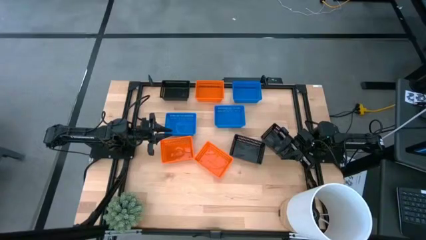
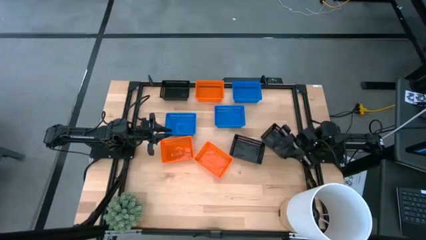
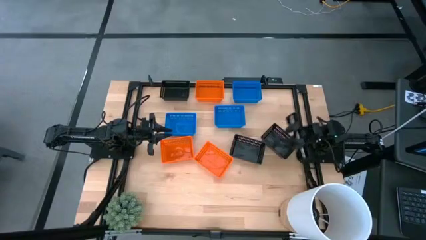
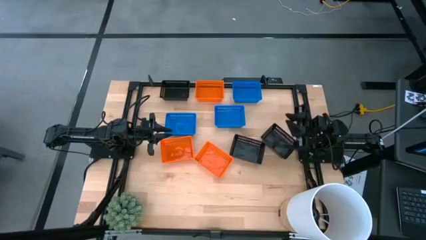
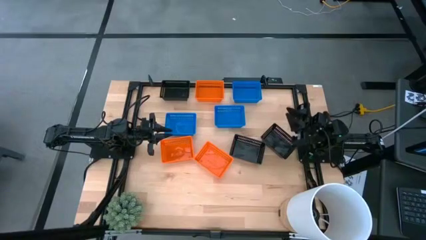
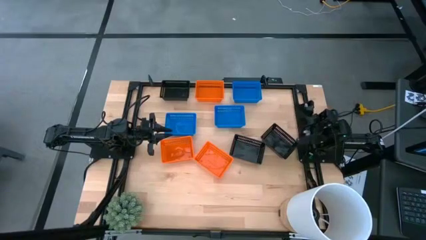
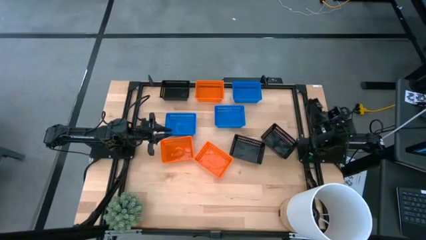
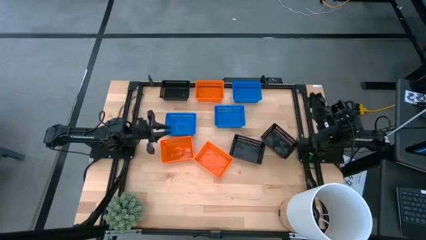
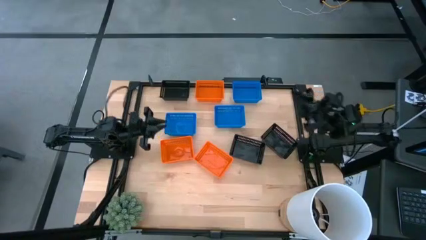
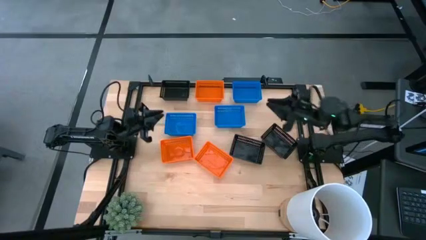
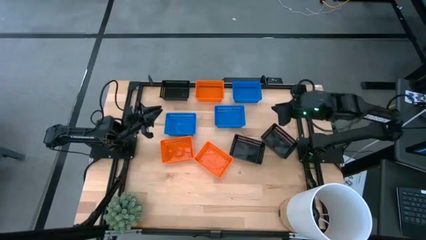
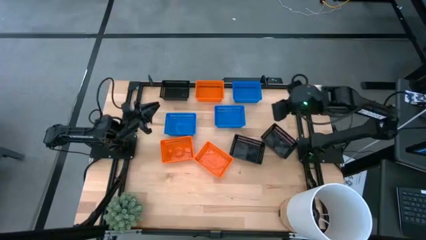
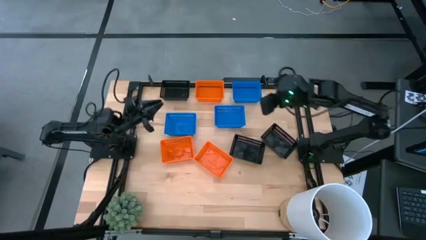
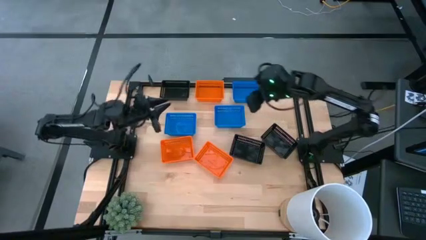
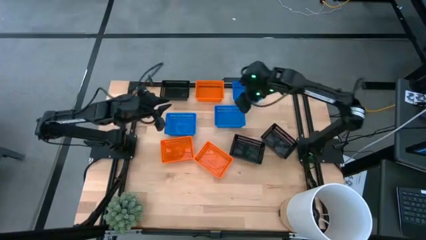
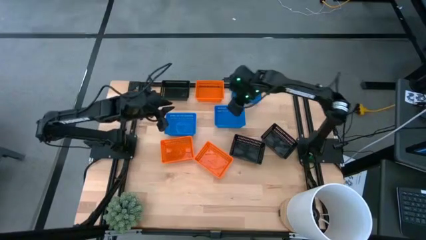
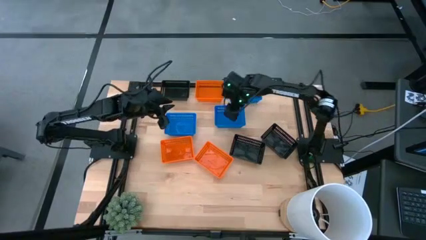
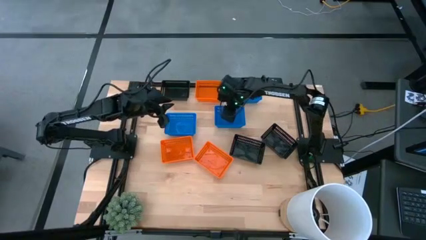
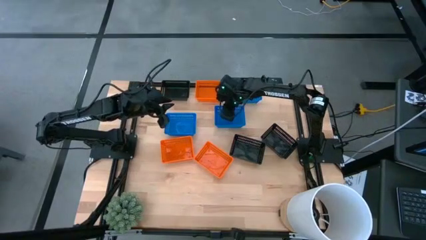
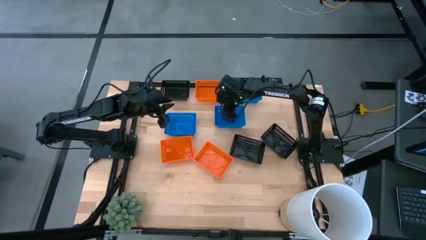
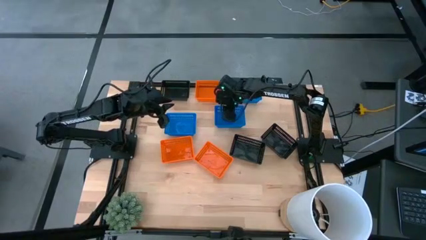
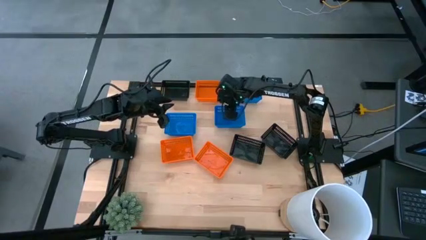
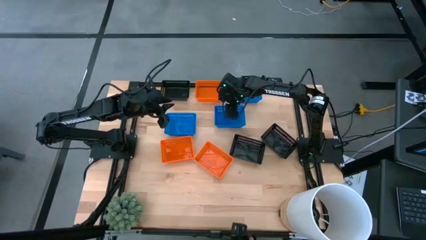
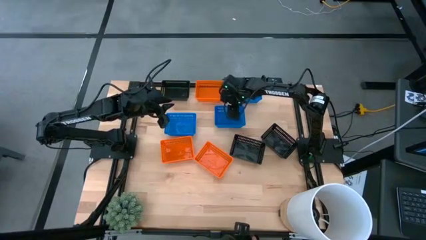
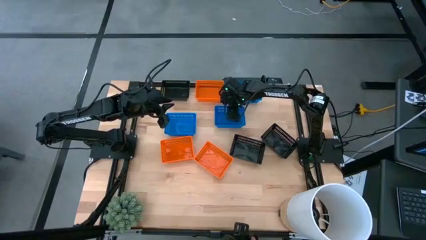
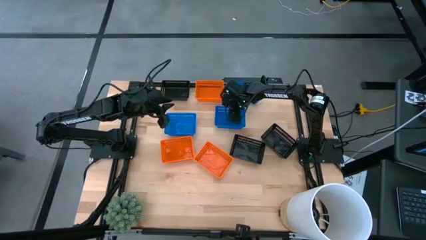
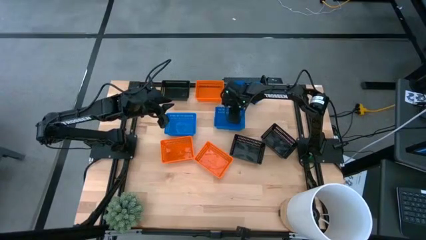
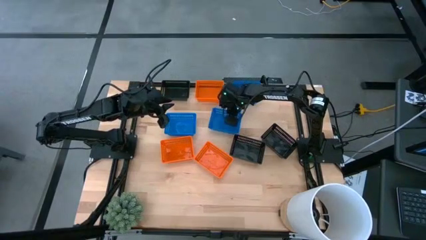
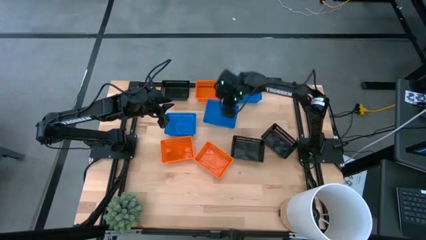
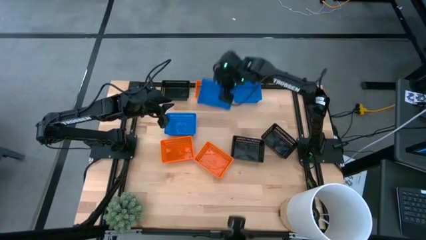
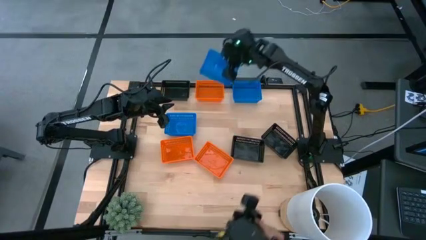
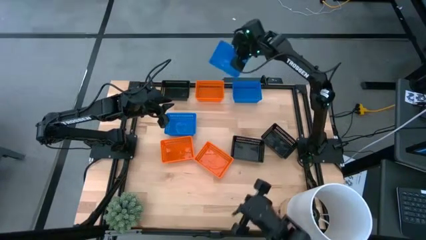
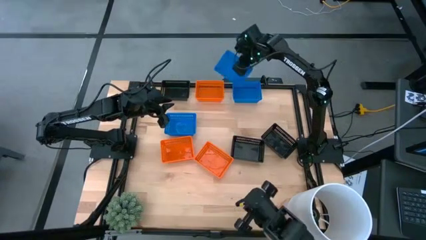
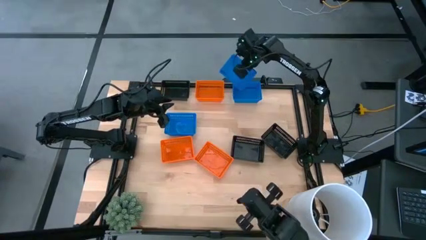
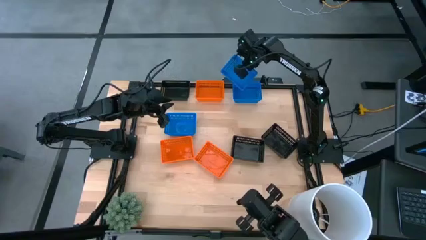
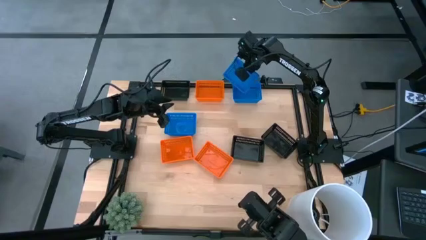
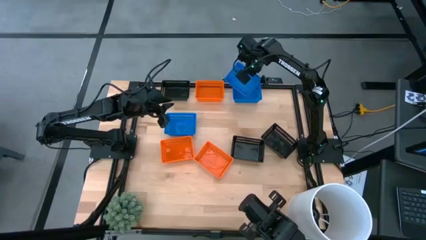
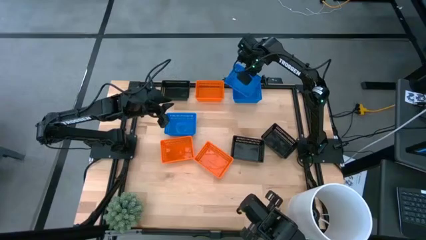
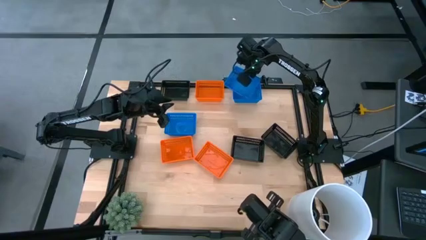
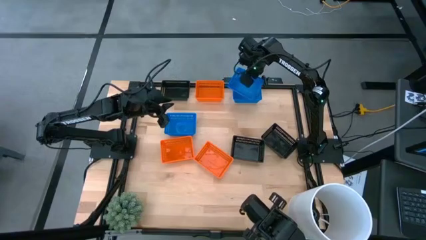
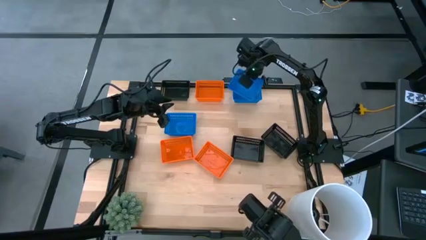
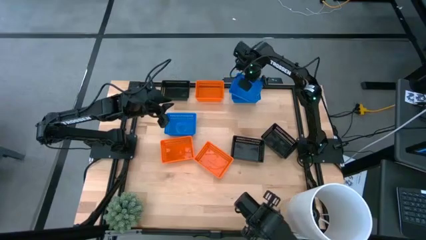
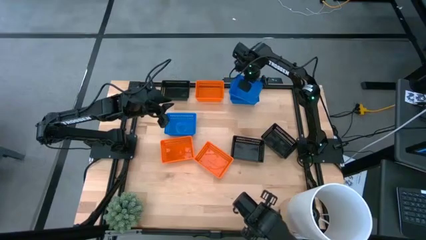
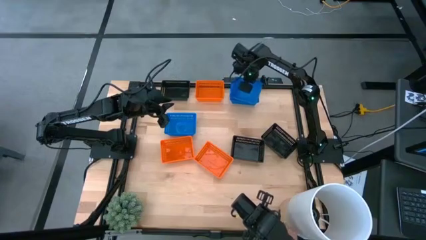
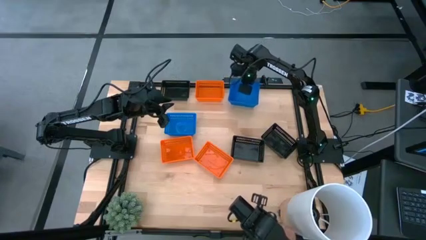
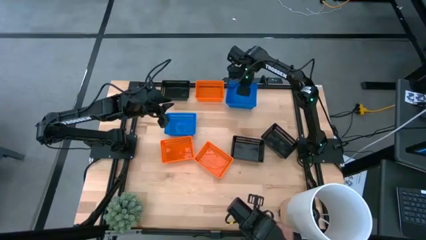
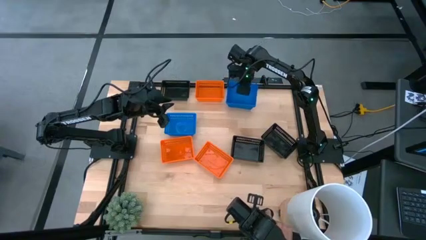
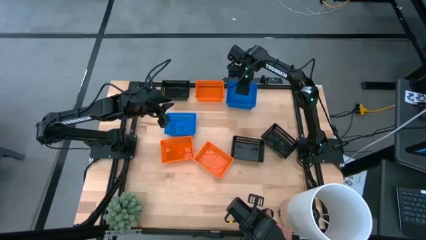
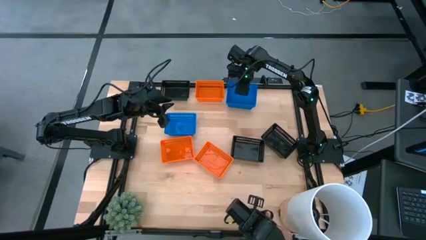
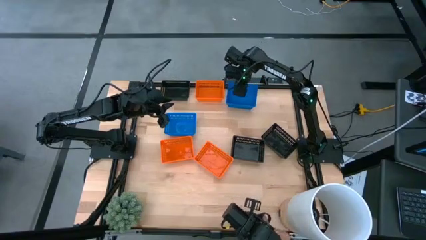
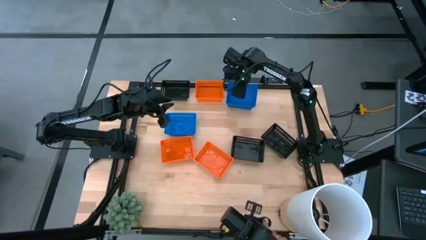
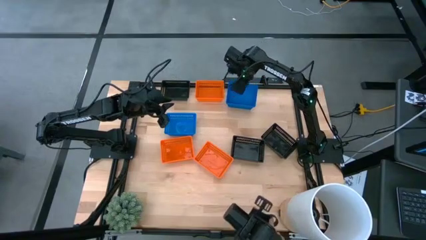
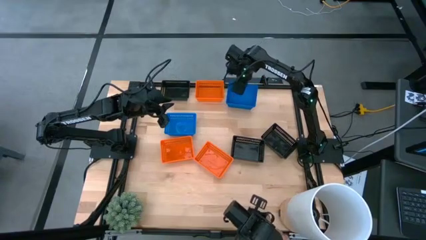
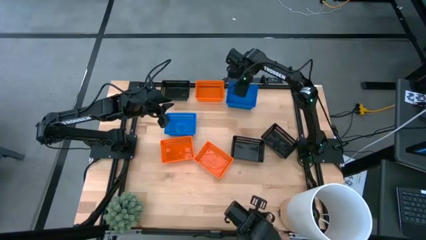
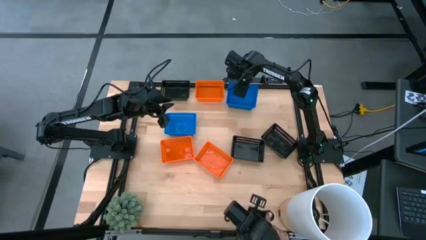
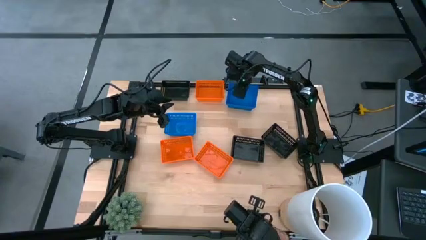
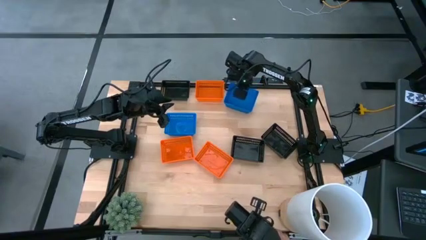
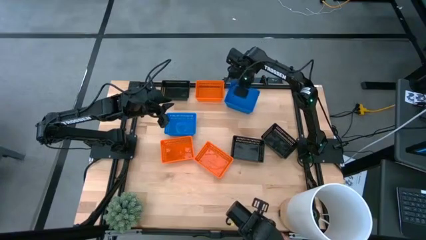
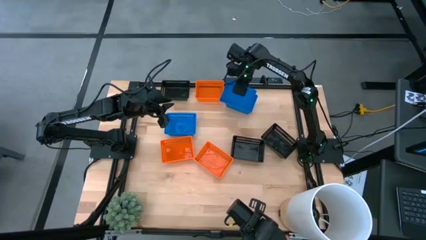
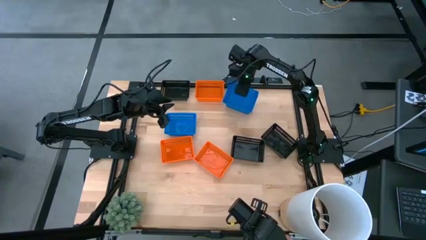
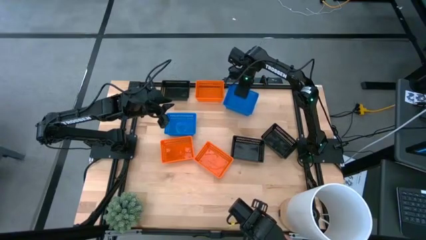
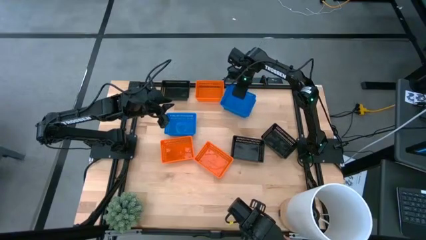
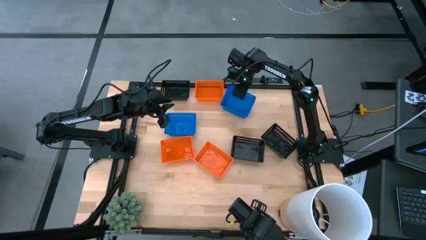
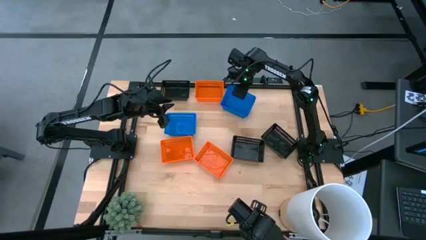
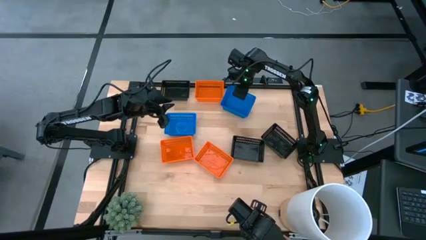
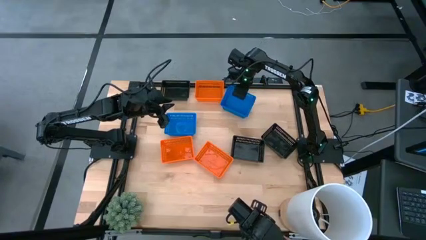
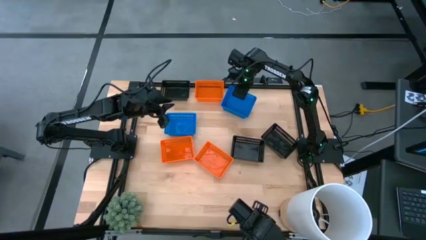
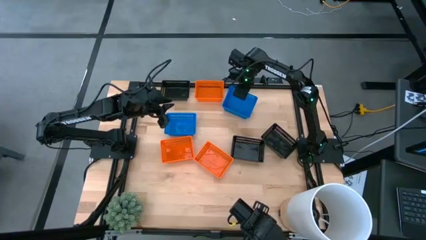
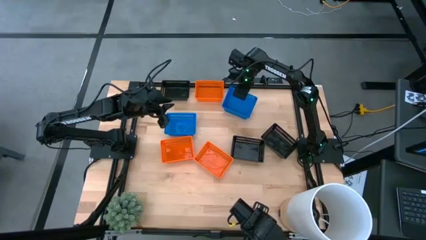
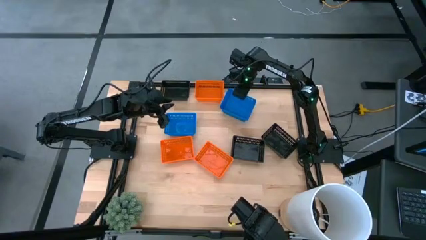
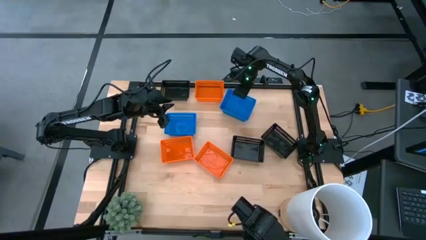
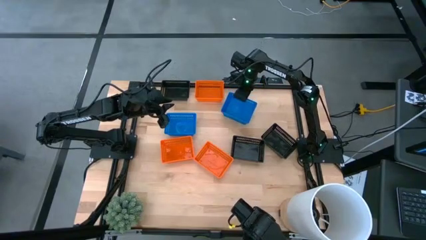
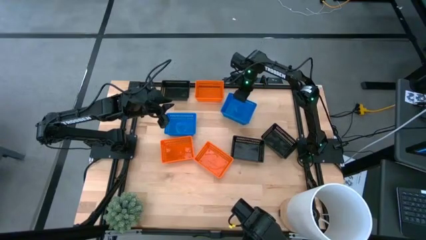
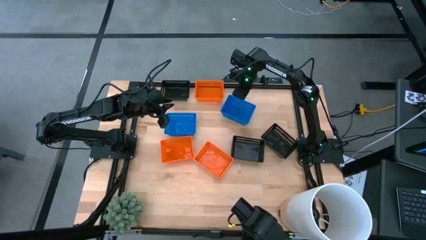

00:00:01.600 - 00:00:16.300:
Stack the bottom right blue bin on top of the top blue bin
